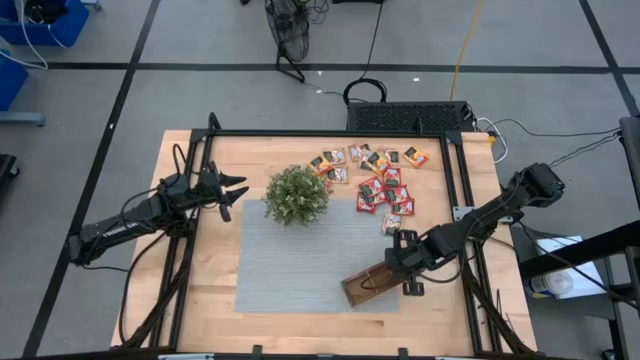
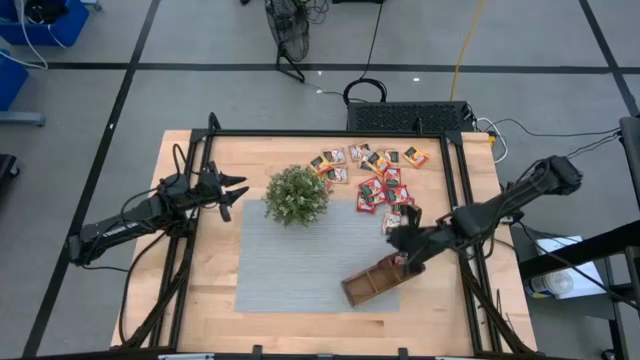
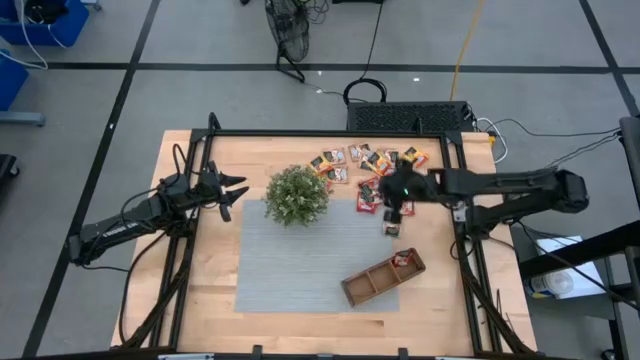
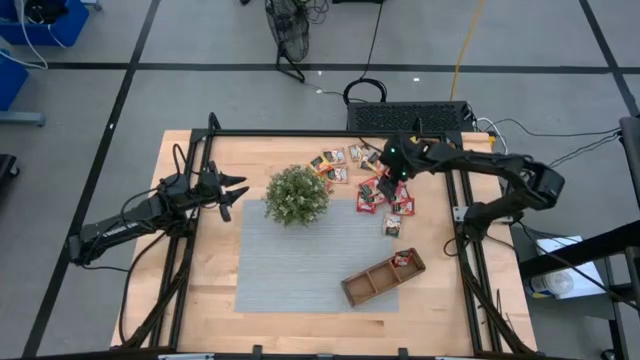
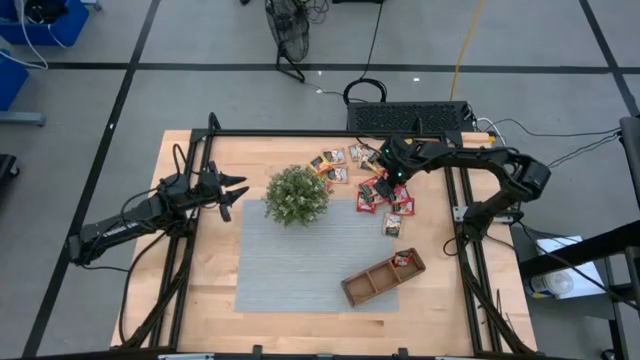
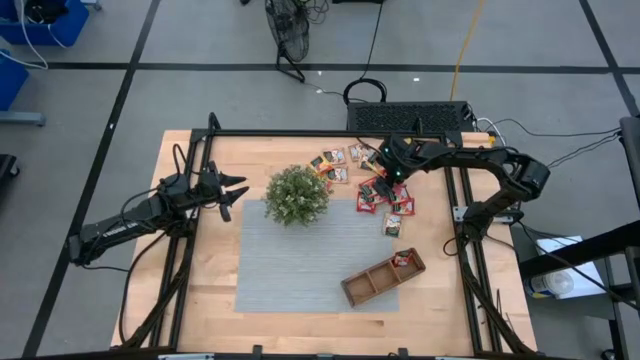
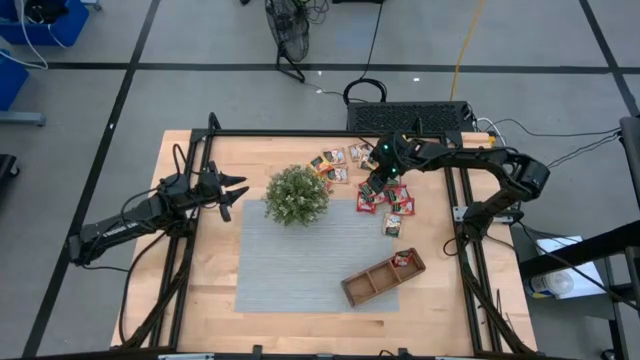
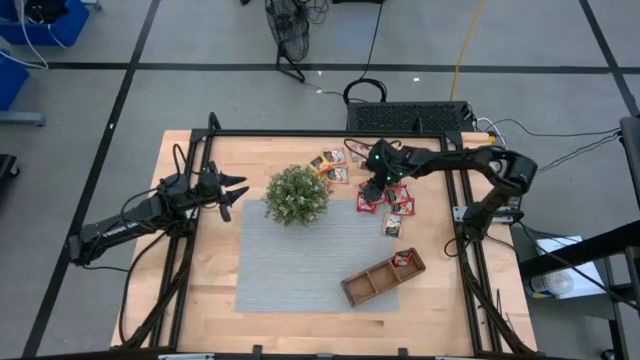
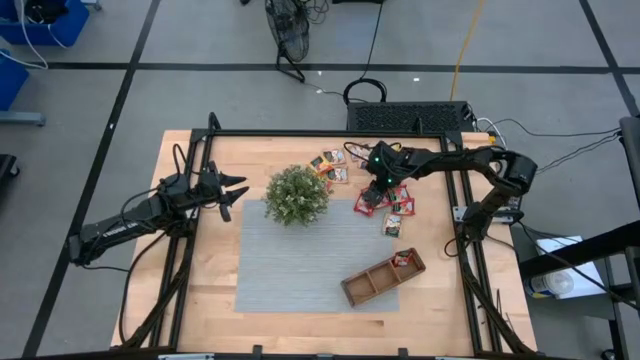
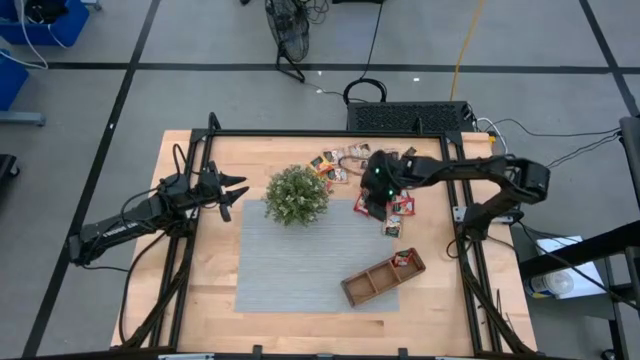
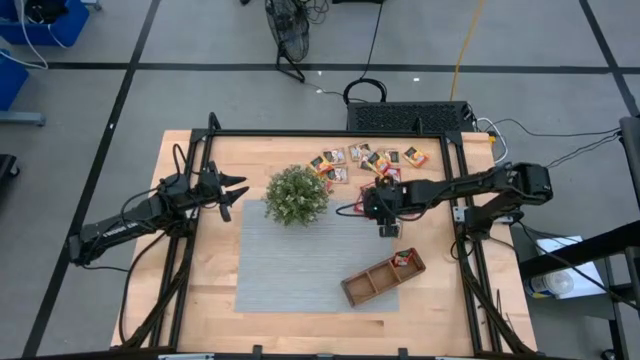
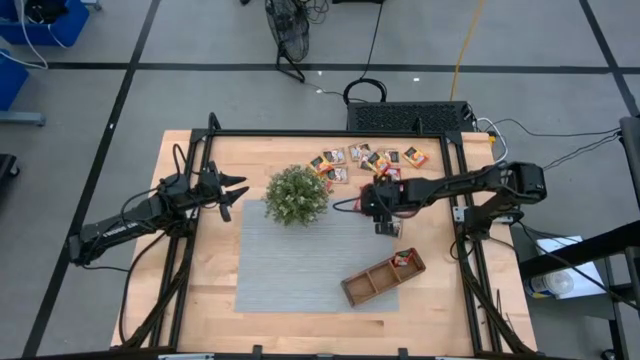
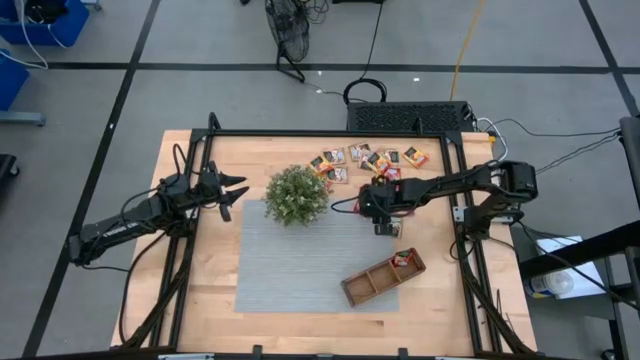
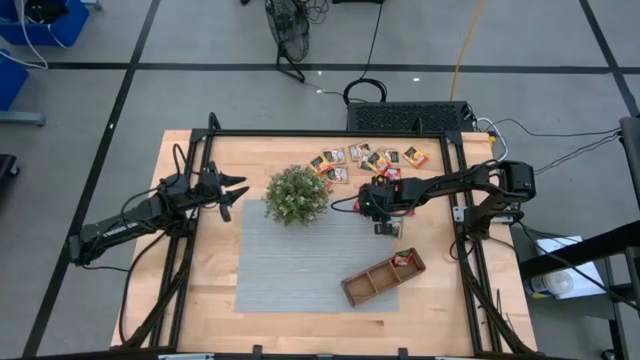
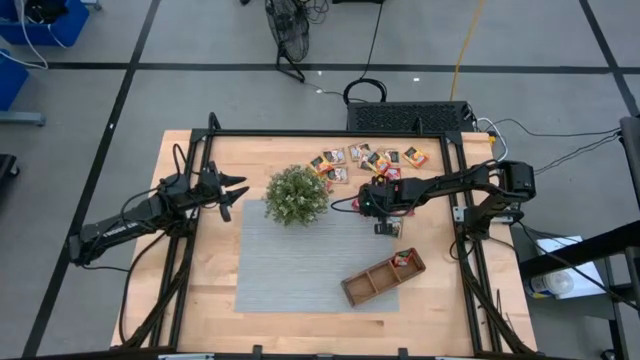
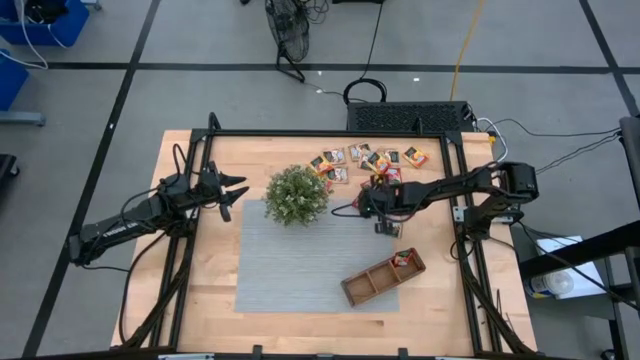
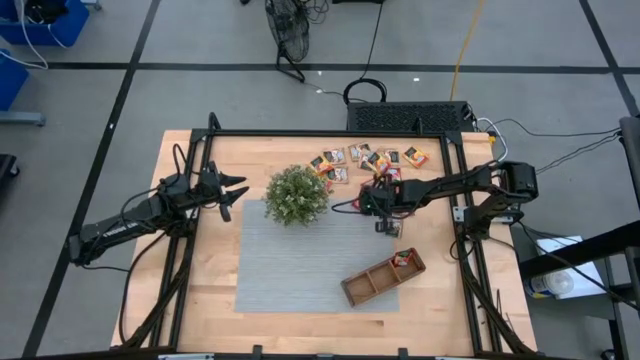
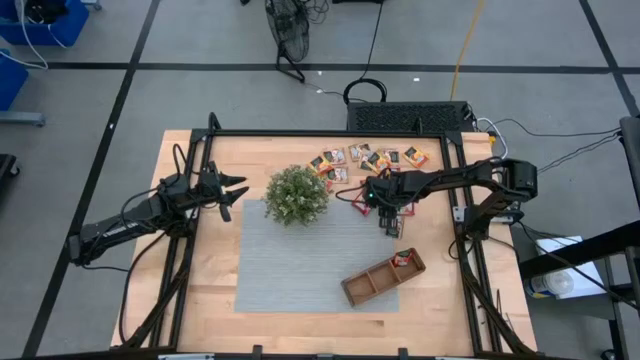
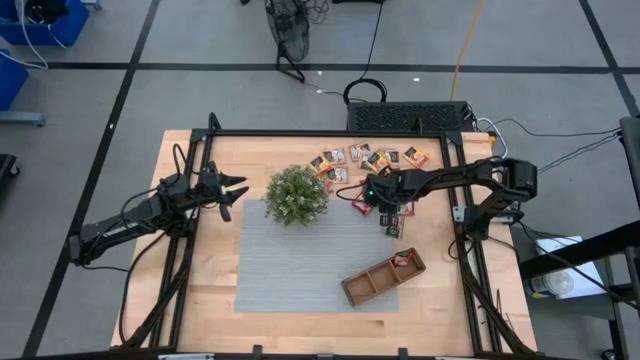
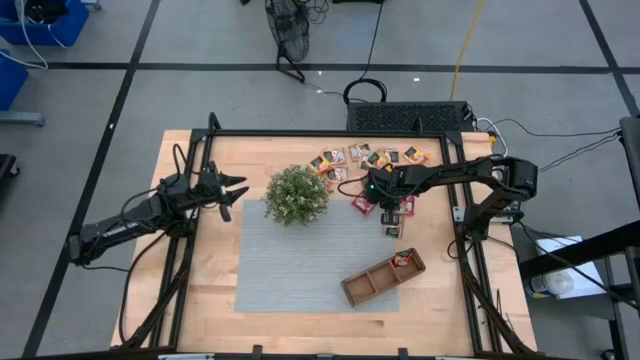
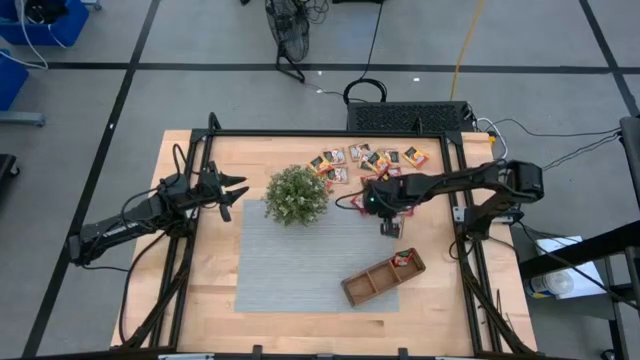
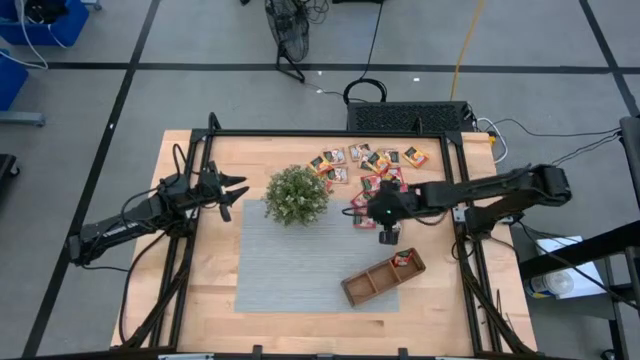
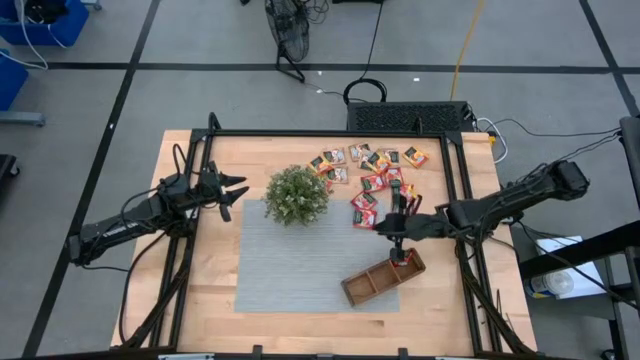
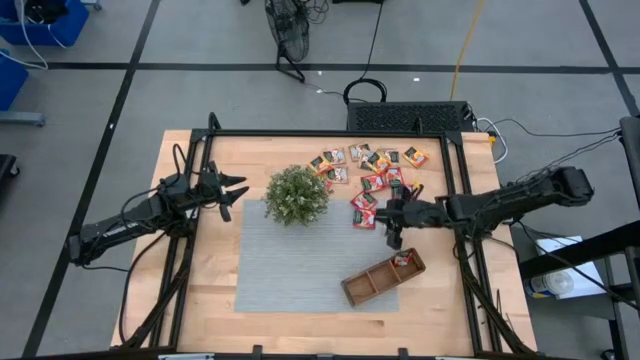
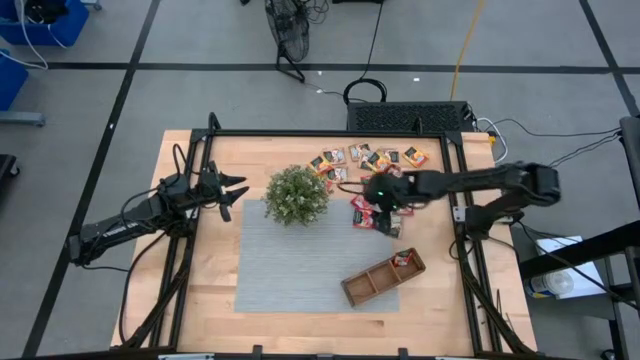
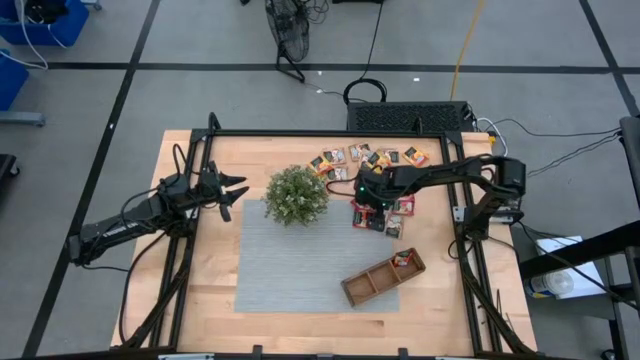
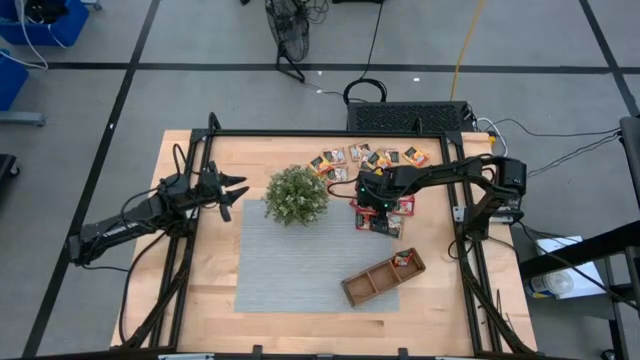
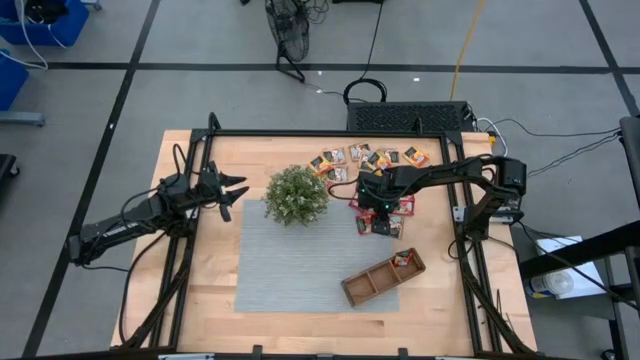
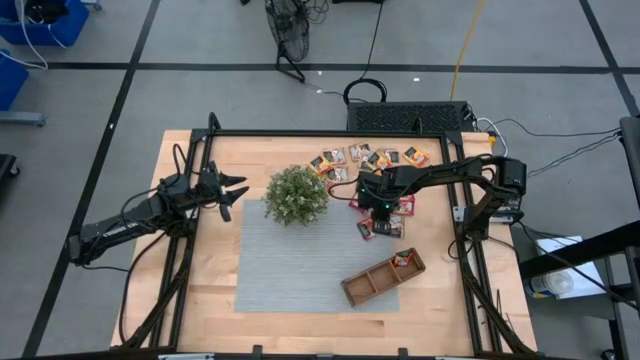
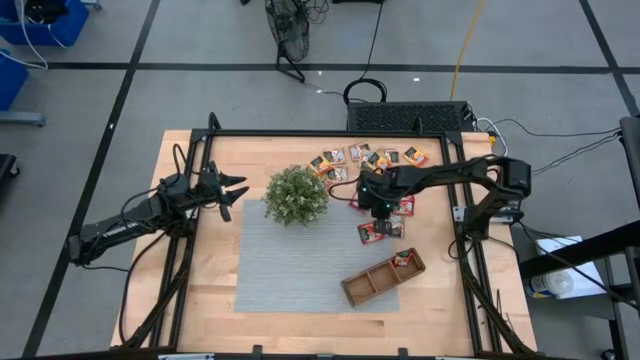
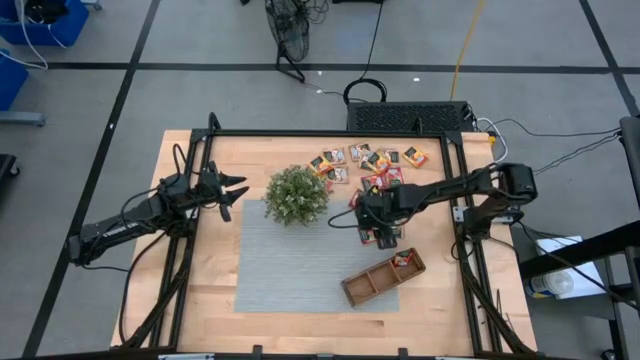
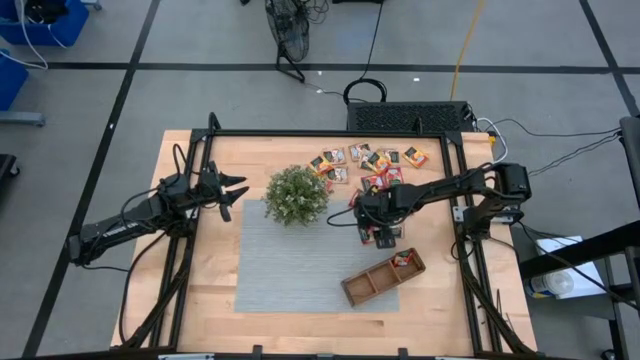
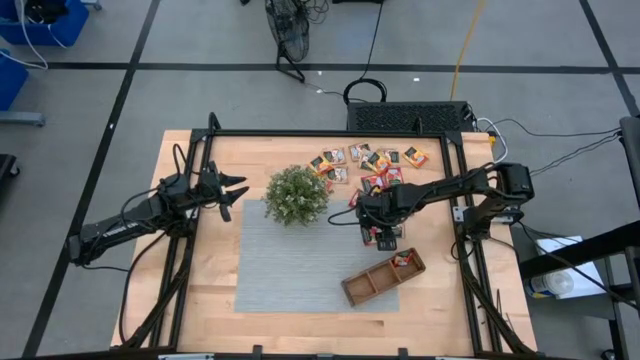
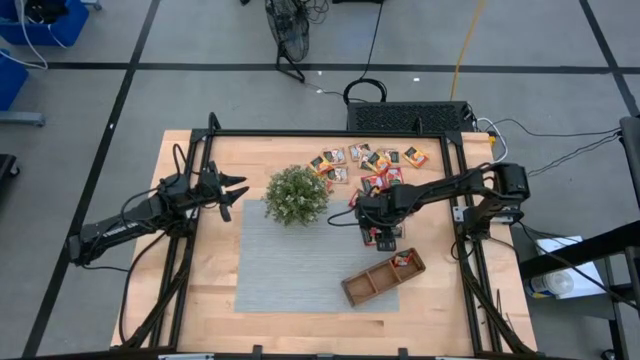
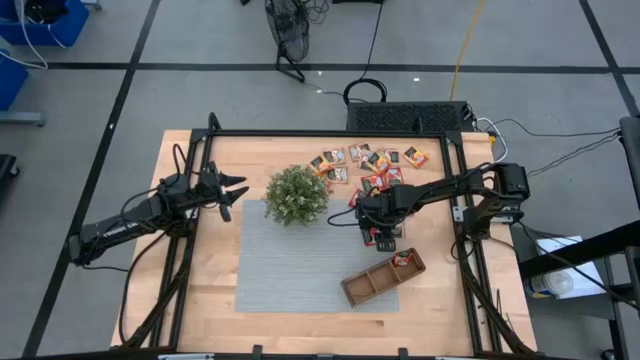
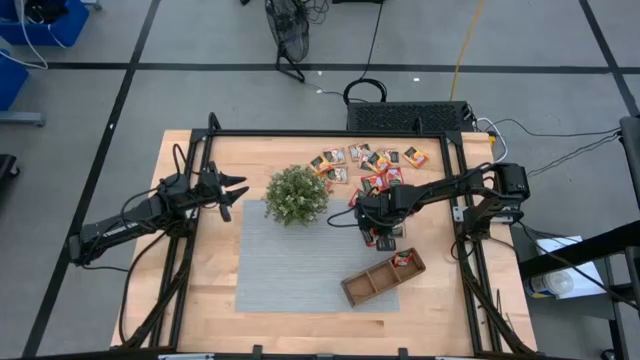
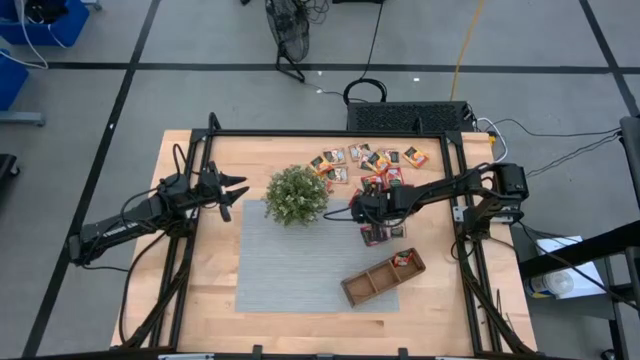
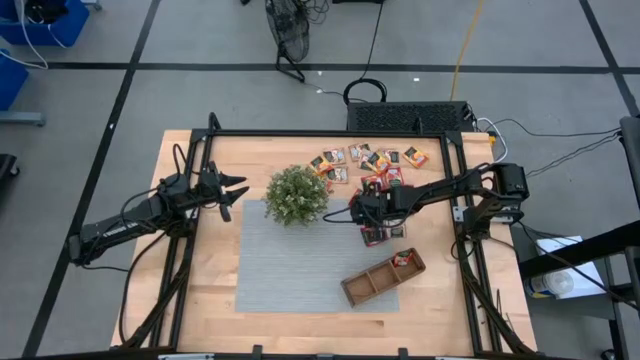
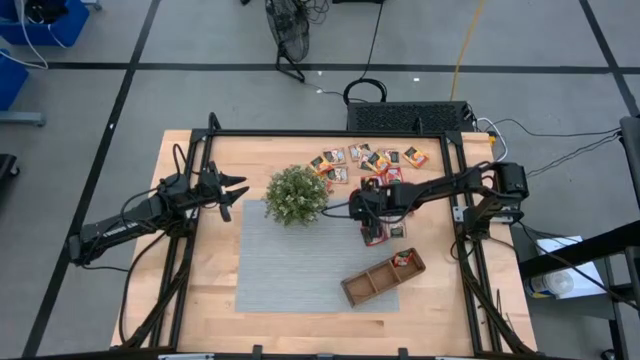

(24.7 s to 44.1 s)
Task: Pick & Place Tea
Put the strawberry tea sachet into the brown organizer
